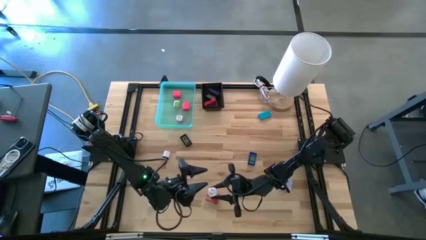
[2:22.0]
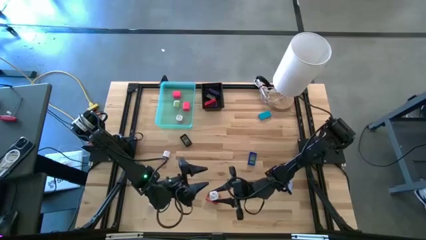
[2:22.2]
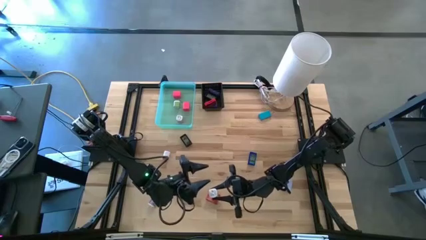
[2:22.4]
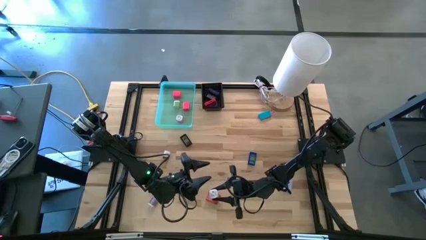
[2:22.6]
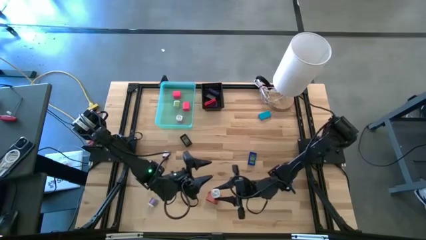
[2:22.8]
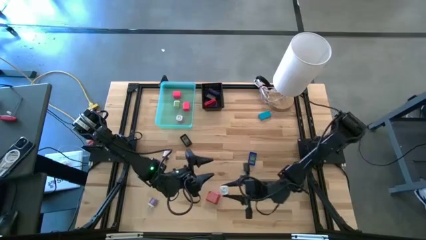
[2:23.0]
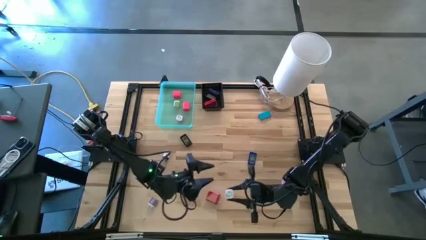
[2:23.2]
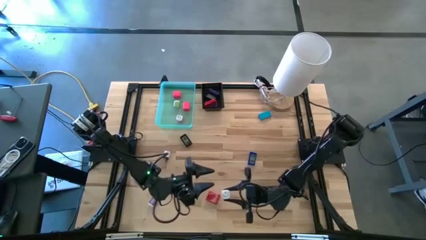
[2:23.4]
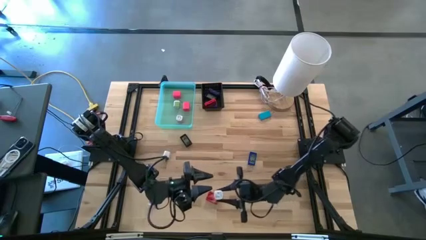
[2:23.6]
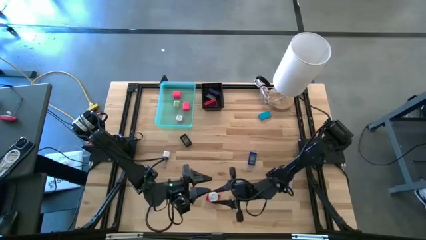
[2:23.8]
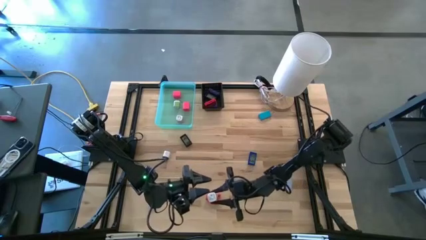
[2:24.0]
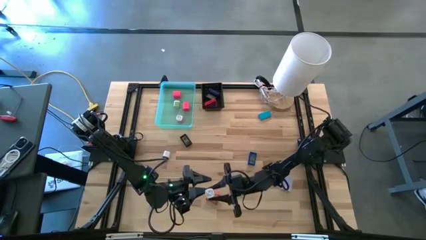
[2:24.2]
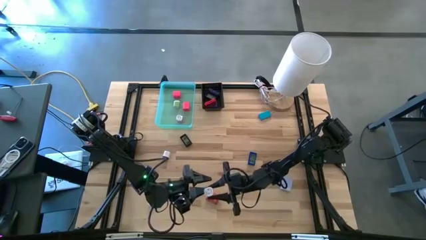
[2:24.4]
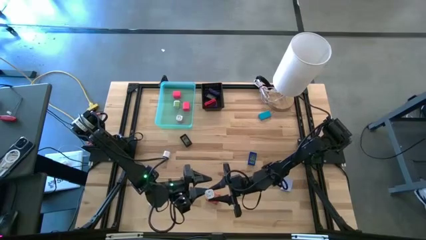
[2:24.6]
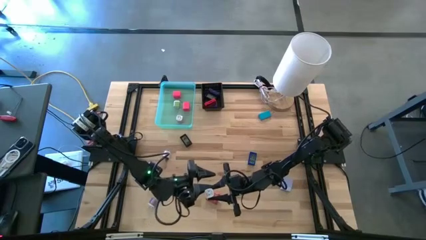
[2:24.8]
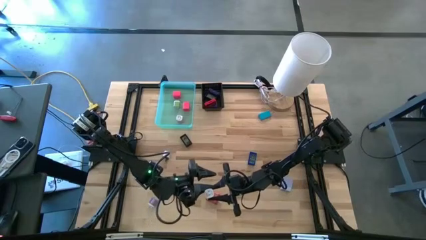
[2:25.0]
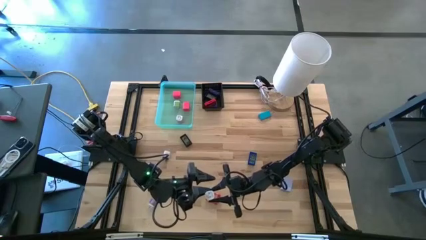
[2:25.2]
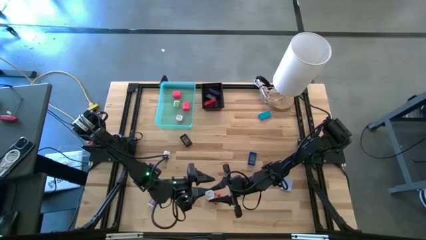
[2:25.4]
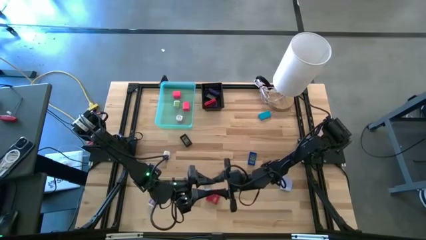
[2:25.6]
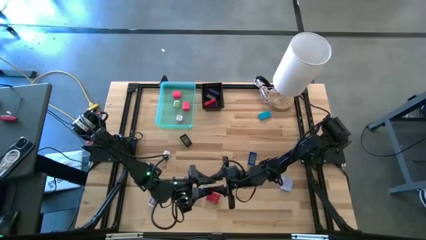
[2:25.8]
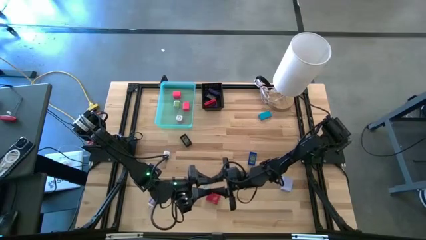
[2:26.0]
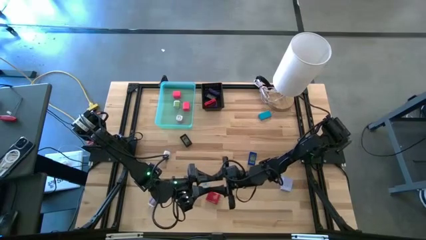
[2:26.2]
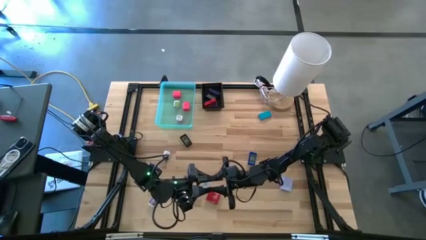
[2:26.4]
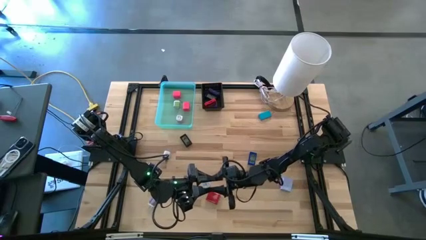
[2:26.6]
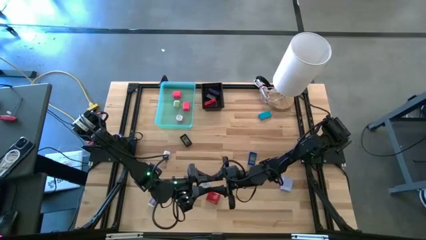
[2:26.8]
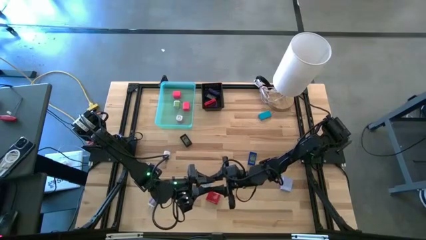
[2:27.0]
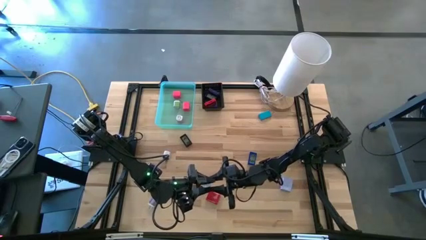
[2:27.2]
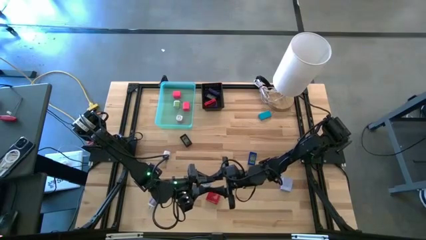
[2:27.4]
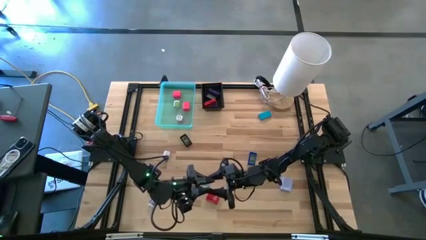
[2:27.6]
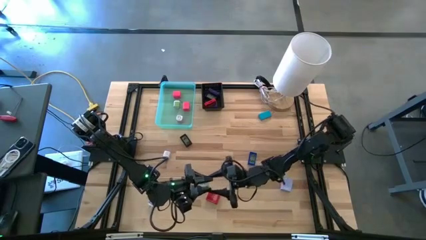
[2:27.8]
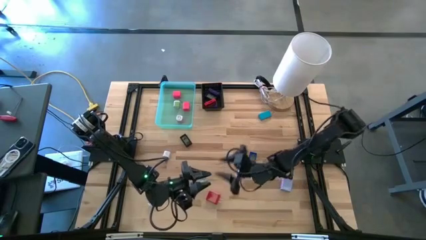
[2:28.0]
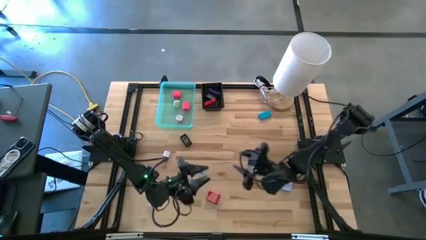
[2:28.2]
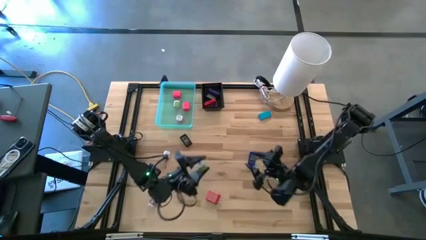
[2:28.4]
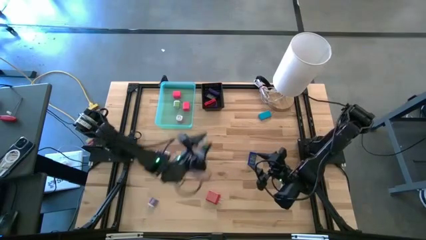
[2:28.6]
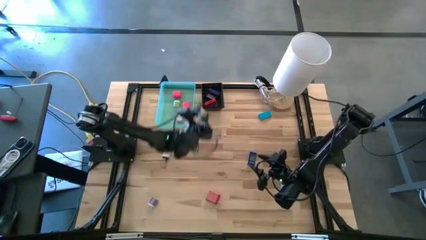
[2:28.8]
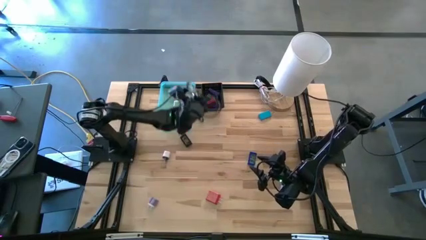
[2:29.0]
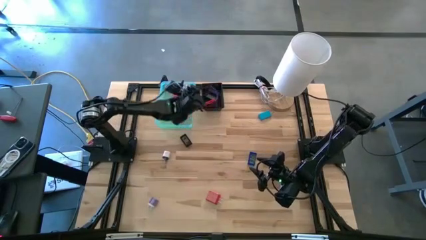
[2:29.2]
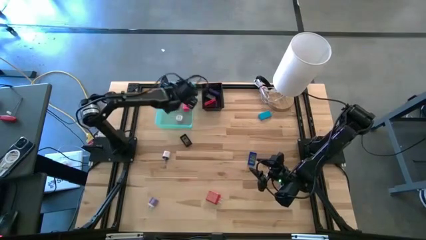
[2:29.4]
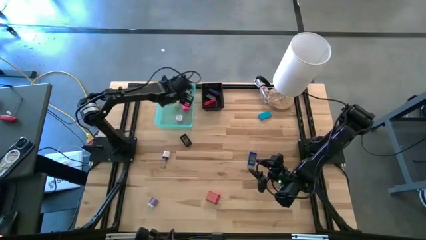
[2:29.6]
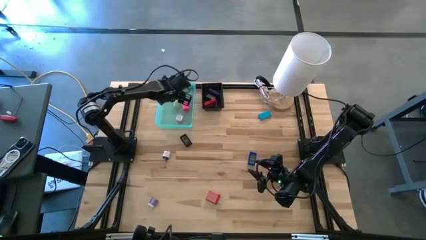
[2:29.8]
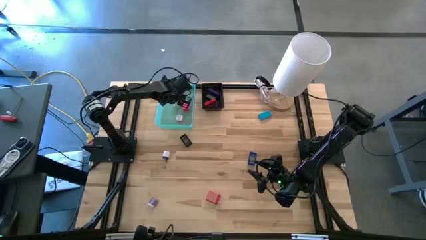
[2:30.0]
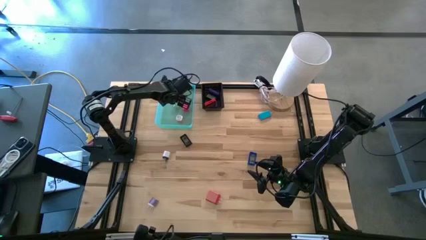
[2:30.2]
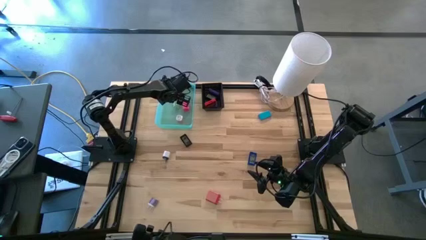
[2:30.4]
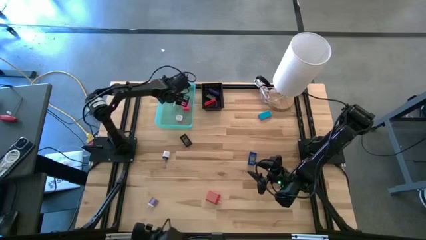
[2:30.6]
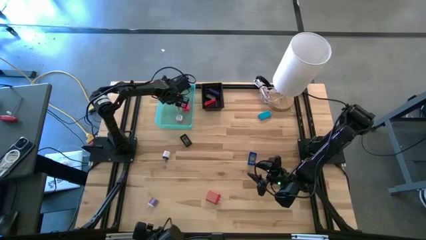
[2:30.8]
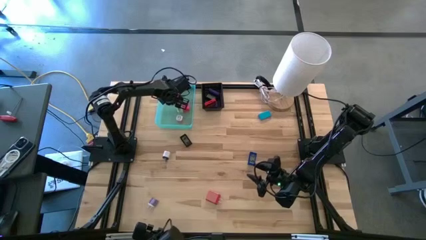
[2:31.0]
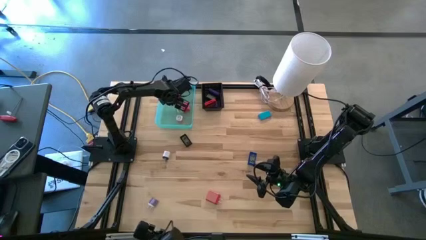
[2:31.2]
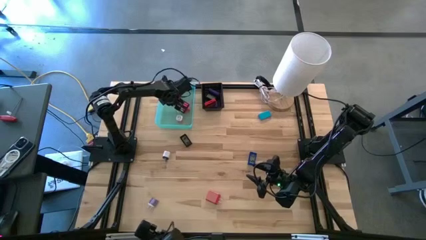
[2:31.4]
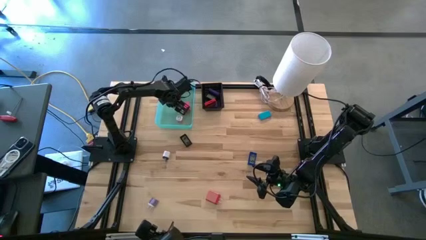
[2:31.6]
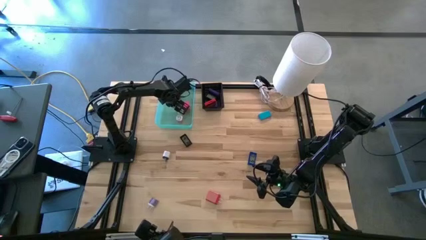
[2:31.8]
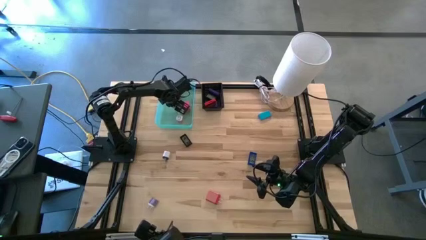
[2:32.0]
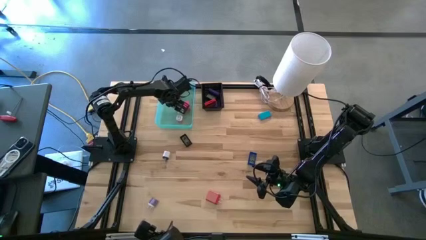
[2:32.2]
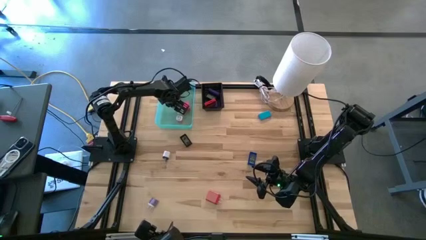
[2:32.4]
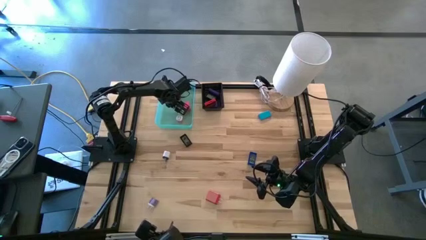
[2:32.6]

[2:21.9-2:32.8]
Task: Pick & Place Office items
Put the green charger adapter into the green bin

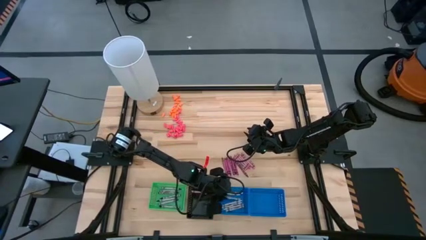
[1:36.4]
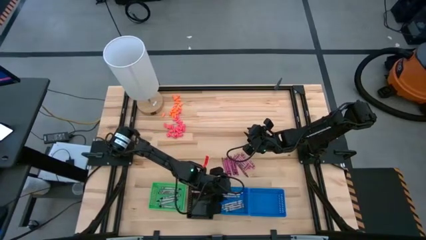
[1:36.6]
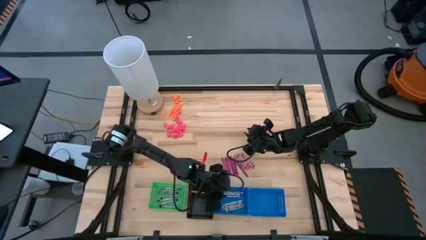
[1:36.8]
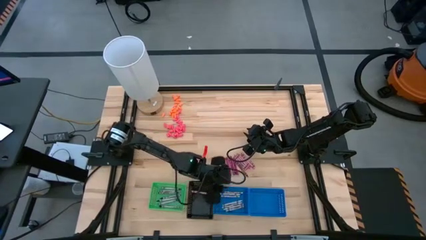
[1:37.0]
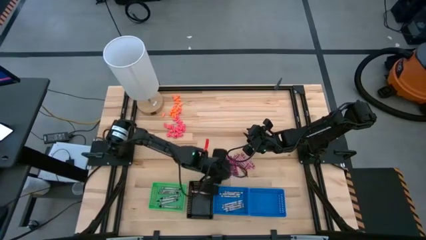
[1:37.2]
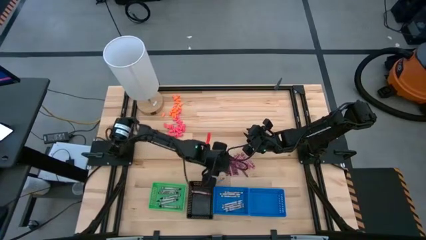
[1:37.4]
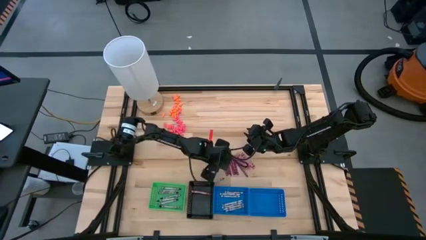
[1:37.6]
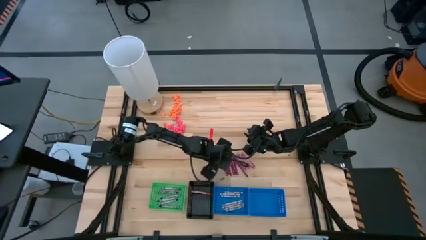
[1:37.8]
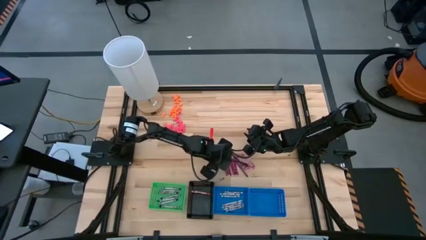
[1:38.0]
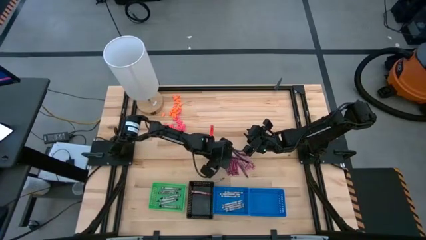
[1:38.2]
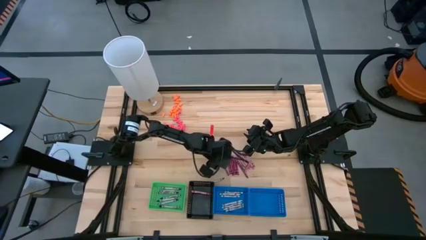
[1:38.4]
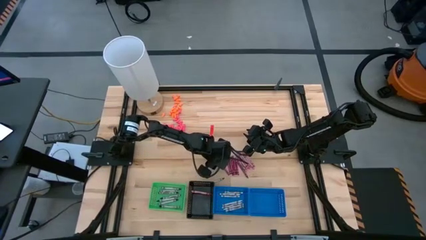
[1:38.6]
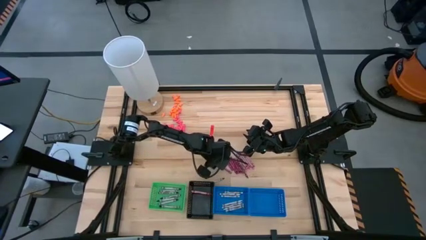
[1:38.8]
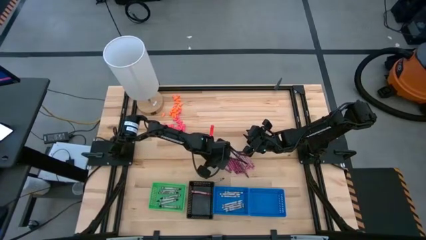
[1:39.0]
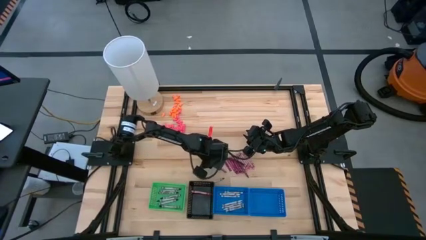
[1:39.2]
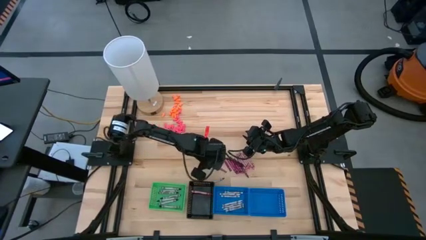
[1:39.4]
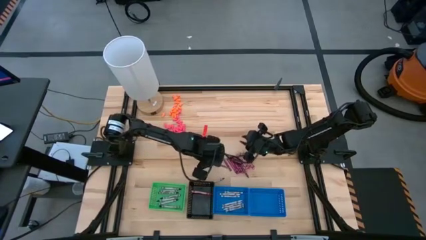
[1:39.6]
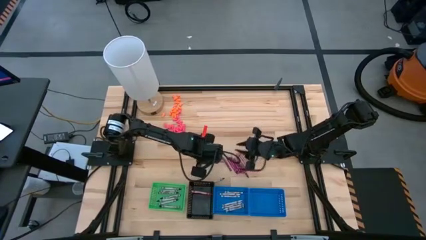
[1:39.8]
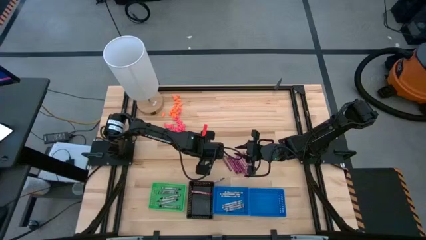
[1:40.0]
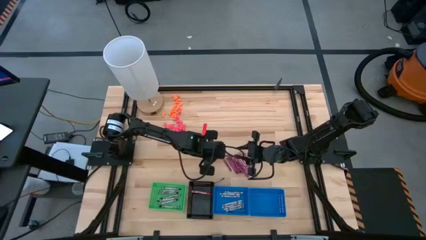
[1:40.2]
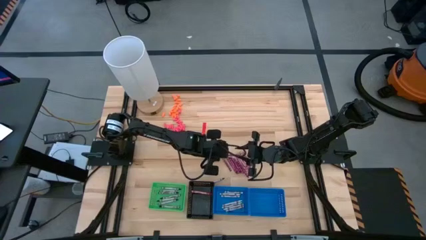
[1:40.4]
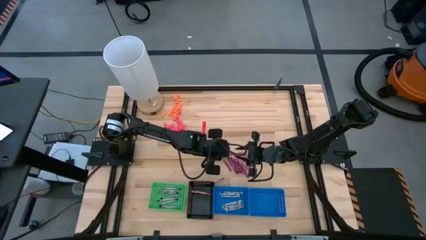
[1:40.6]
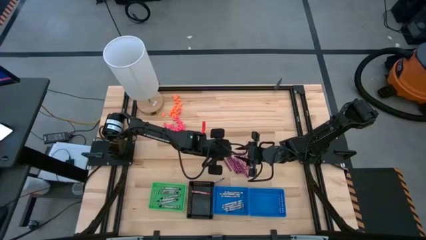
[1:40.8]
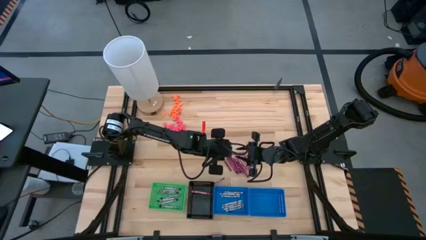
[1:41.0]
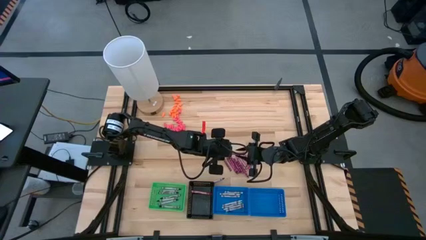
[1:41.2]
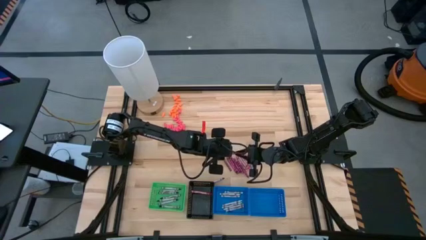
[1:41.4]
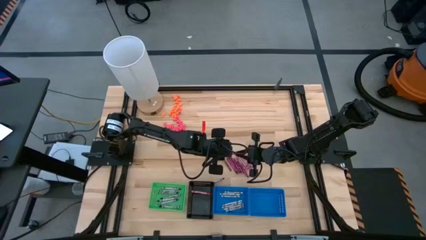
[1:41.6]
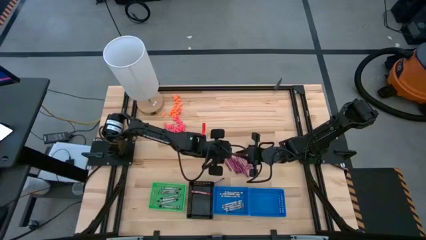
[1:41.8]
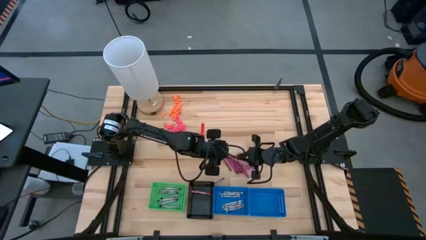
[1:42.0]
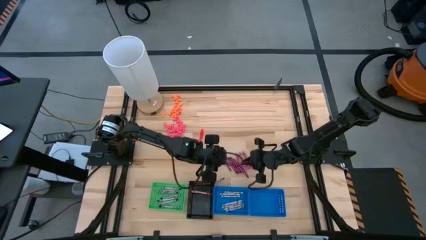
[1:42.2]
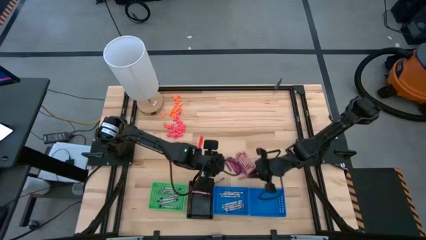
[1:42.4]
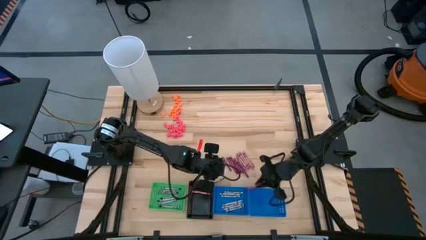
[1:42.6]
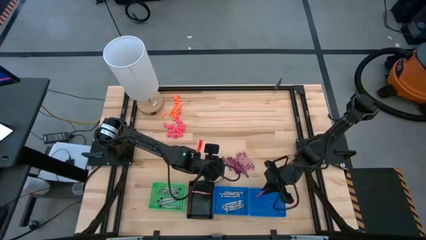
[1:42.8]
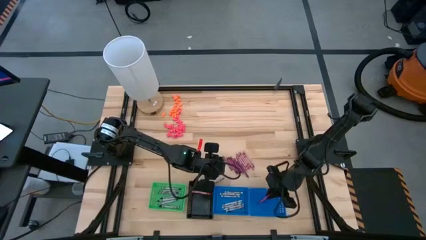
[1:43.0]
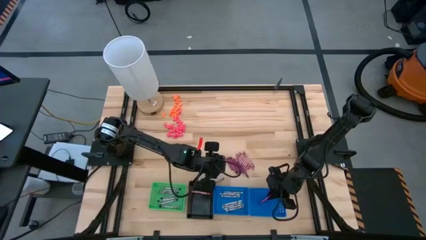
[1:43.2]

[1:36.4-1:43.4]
Task: Sort crayons
Put the red crayon into the right blue bin
